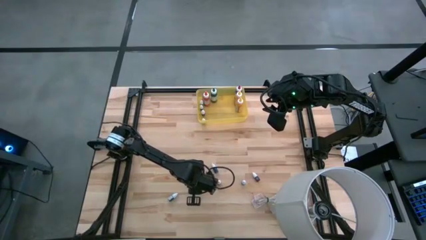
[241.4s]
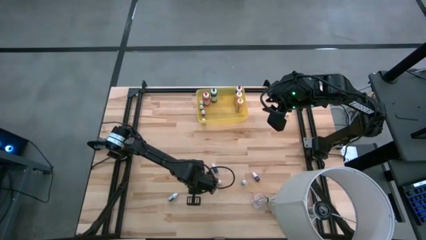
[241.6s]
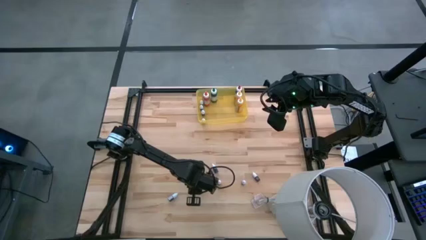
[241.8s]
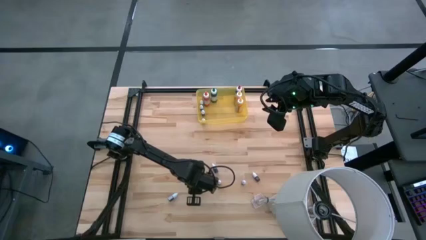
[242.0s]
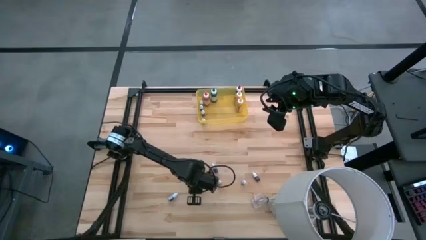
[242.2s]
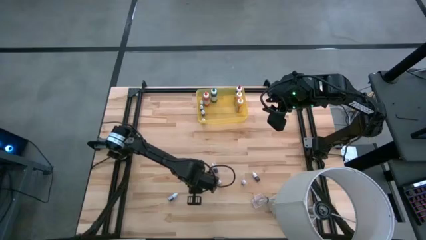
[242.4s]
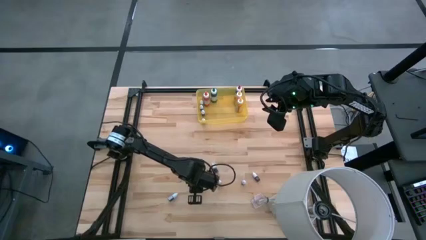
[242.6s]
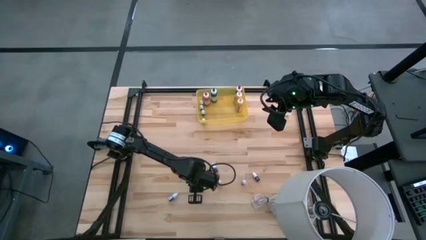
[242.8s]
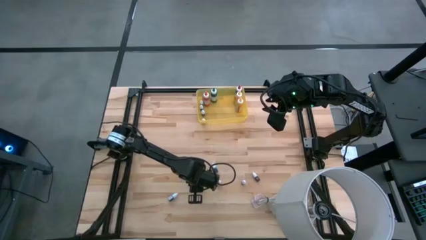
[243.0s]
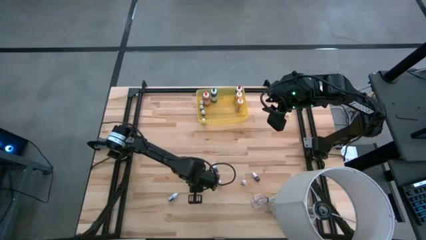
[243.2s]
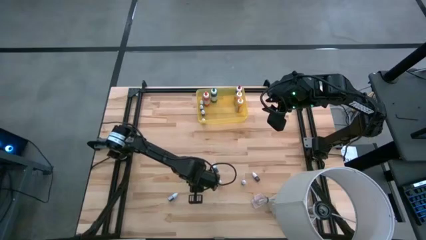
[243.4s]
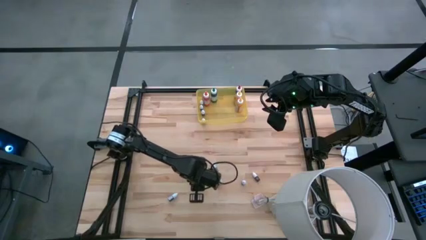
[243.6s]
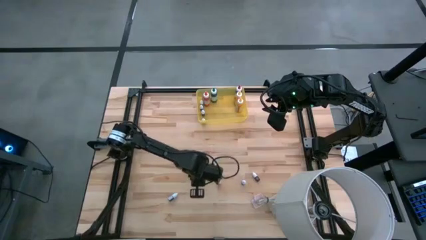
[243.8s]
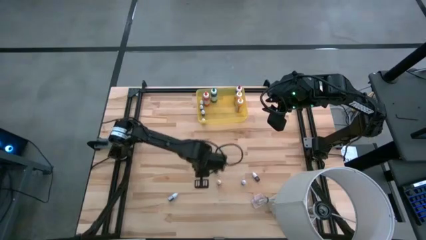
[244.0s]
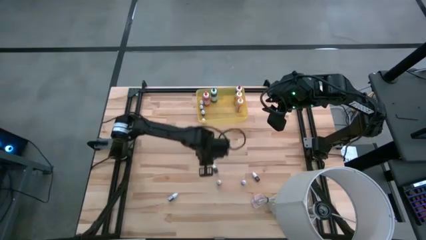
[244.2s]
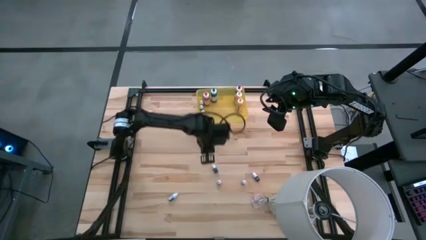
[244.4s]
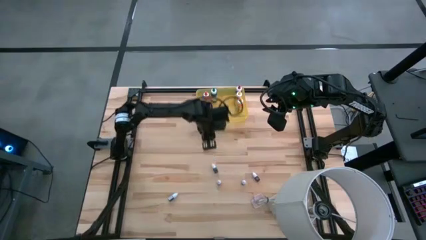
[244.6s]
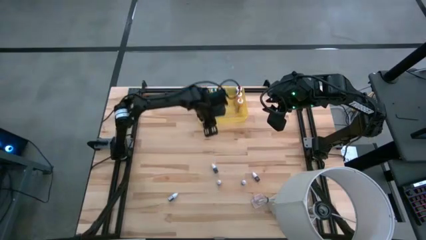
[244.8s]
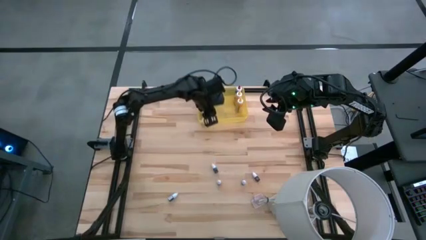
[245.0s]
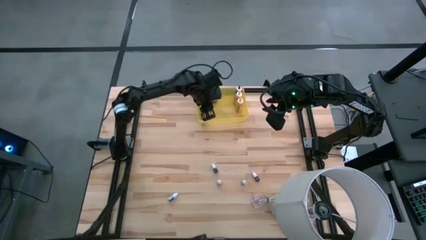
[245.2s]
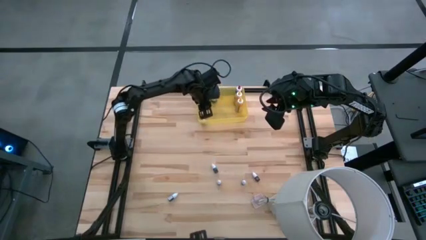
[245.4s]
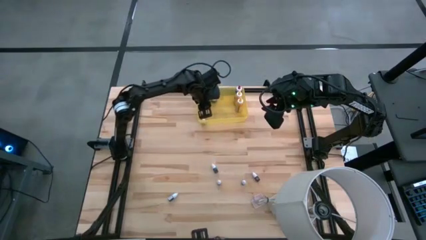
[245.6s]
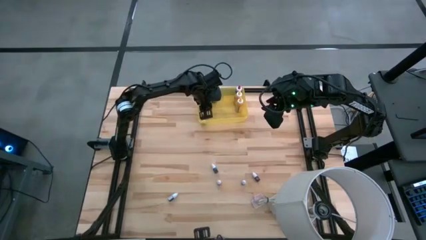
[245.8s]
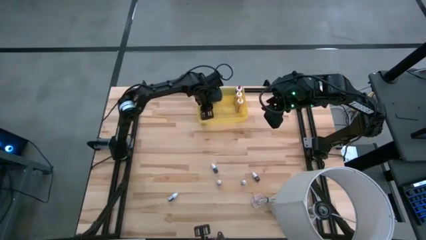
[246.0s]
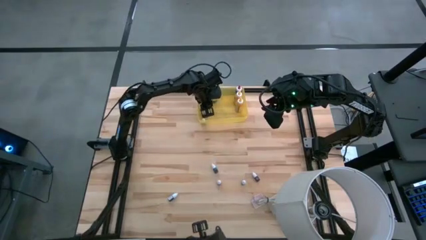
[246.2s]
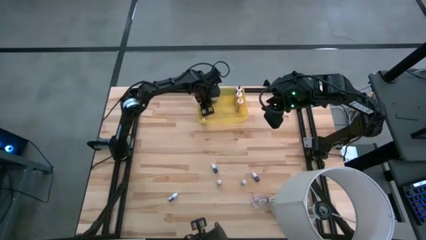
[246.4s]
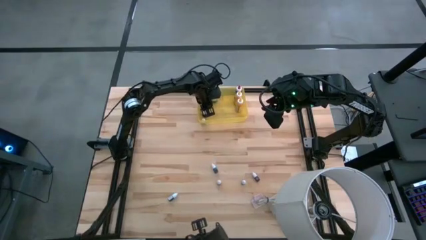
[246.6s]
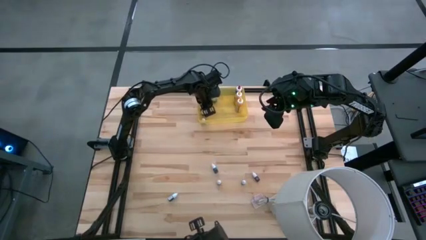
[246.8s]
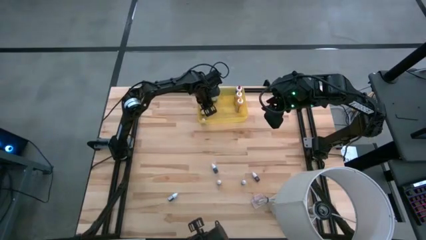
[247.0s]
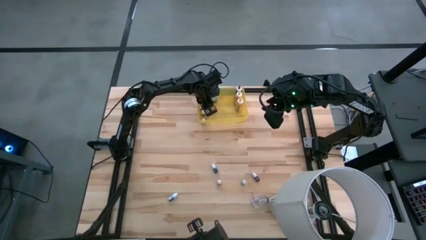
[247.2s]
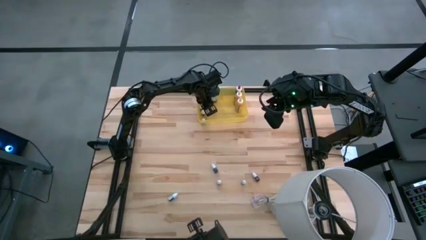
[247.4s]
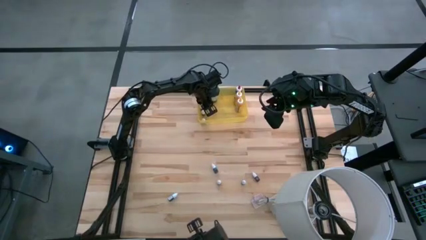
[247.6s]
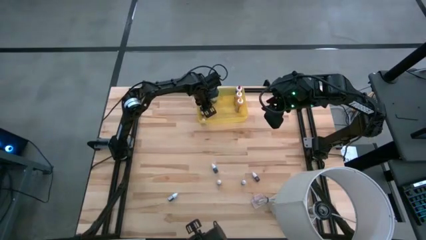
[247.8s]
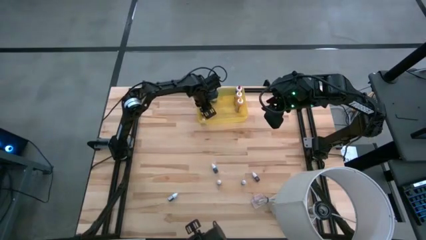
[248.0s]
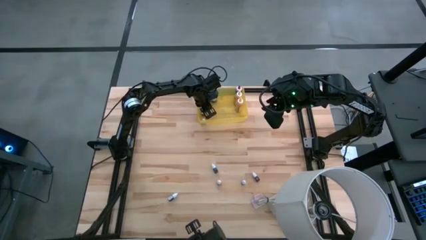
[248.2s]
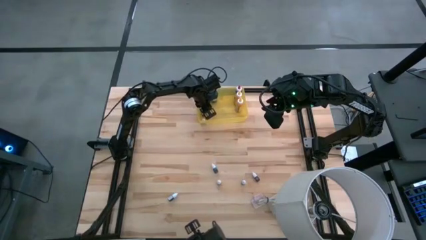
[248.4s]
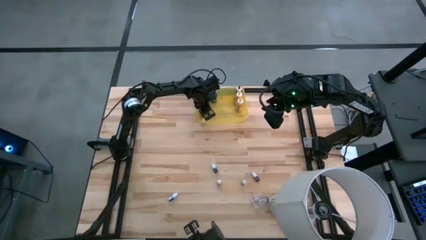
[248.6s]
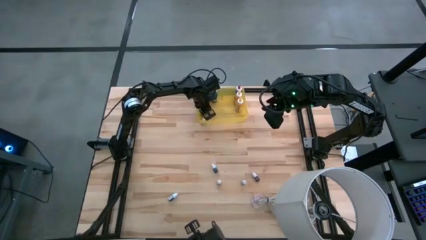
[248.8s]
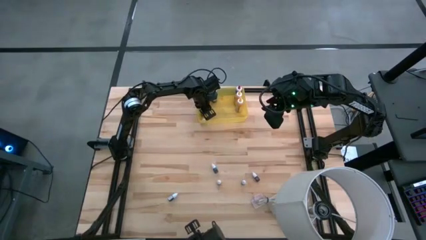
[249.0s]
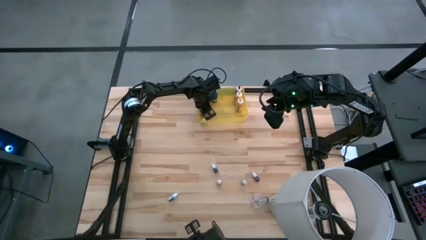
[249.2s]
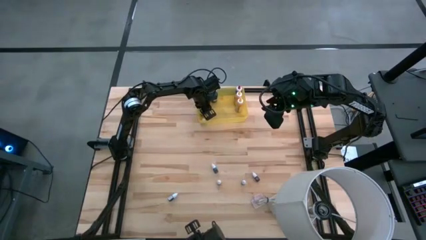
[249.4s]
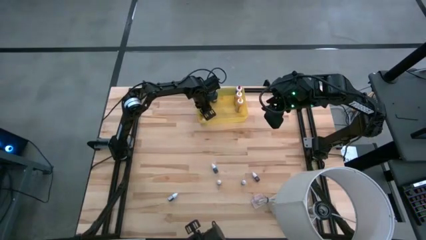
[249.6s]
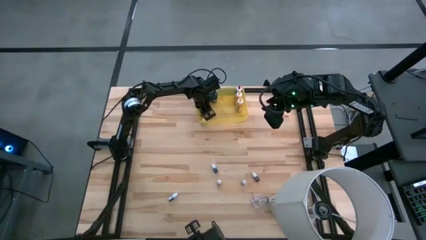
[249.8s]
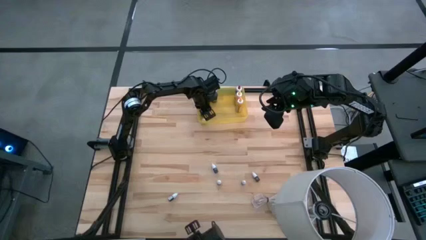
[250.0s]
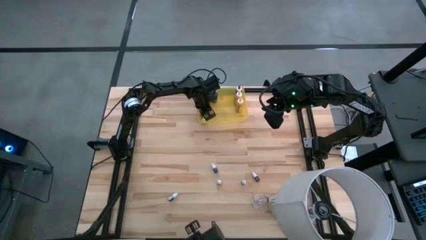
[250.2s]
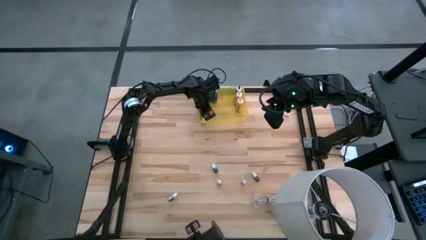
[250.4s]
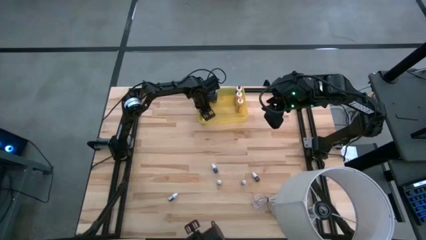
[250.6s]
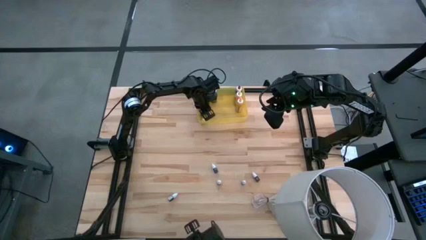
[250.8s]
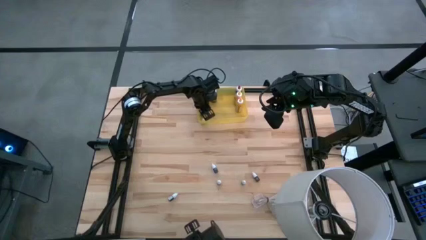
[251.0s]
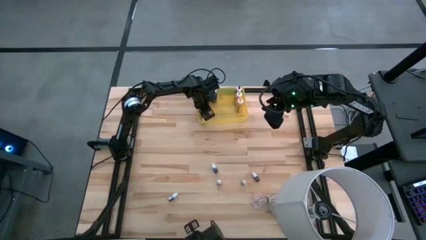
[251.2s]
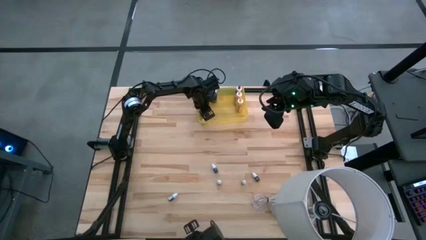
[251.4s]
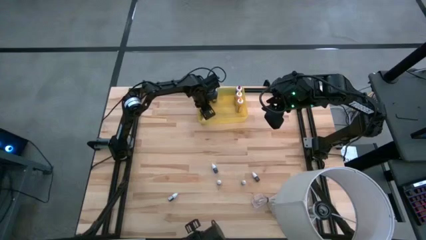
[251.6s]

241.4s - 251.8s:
Task: Pick & Place food coloring
Put the small pink food coloring bottle into the yellow bin
